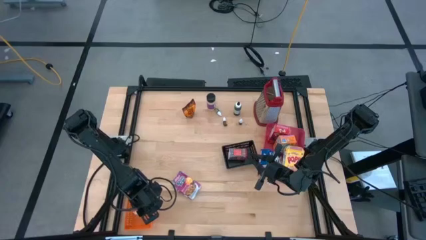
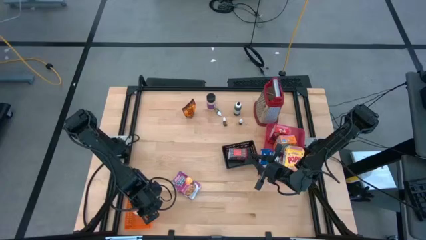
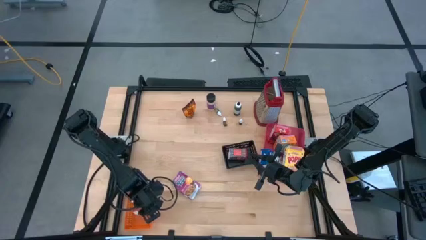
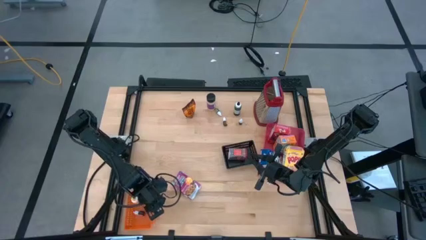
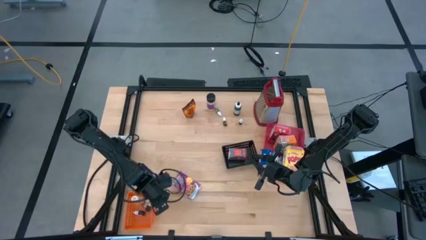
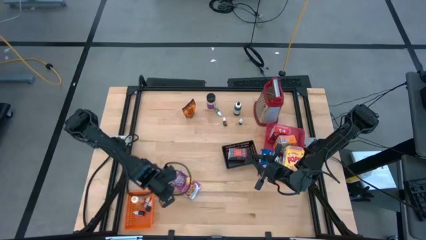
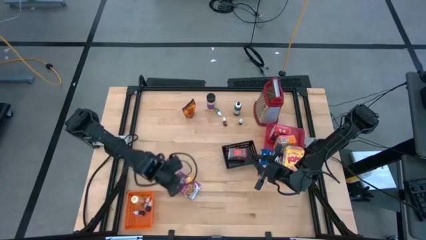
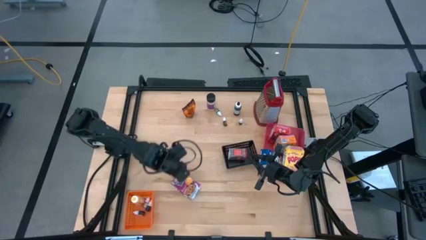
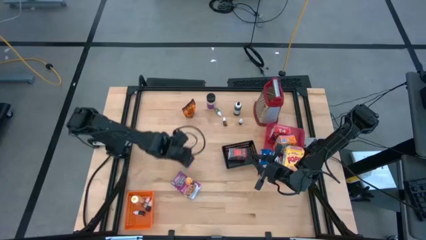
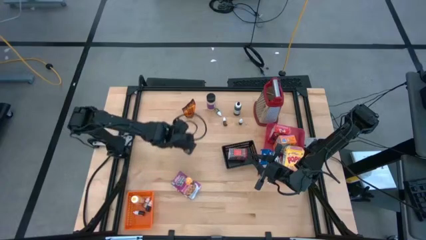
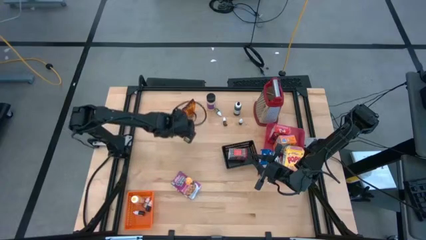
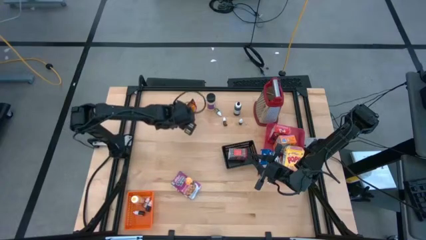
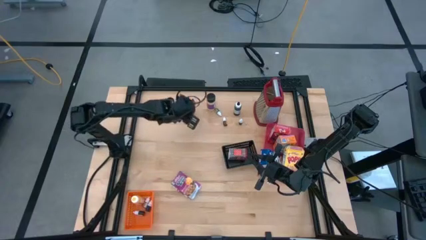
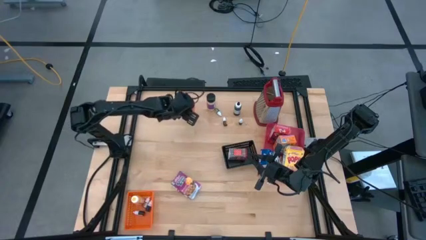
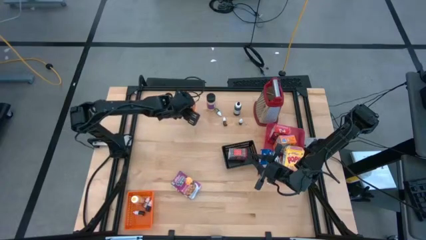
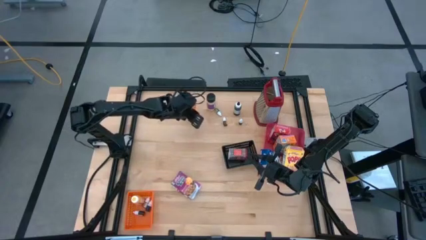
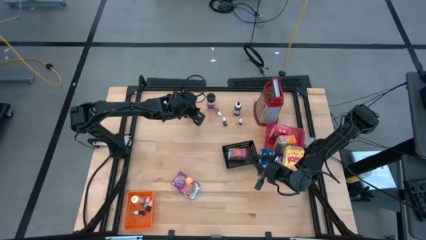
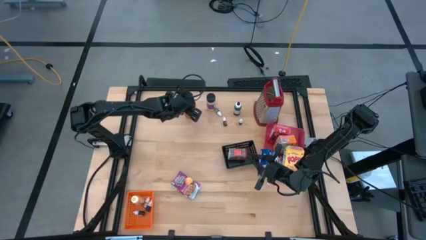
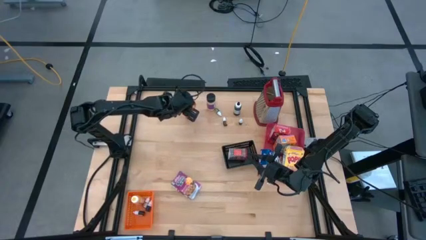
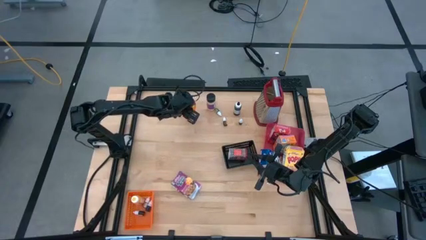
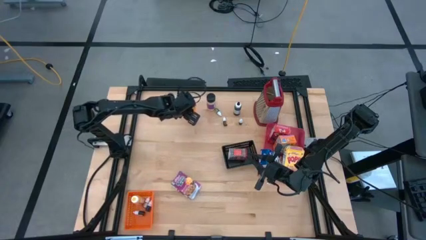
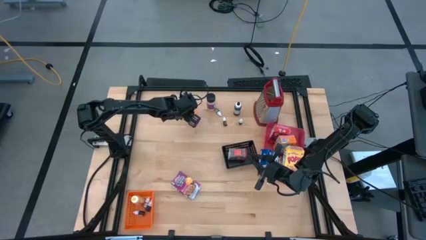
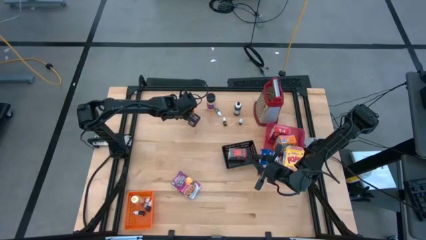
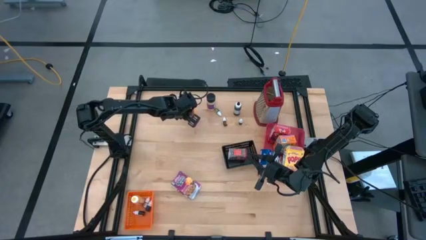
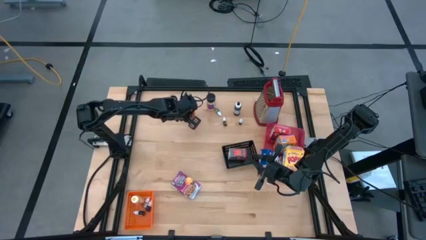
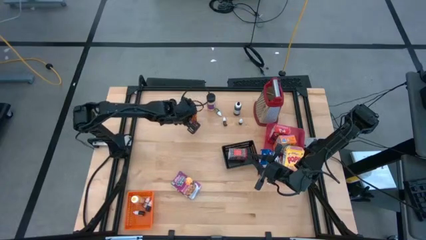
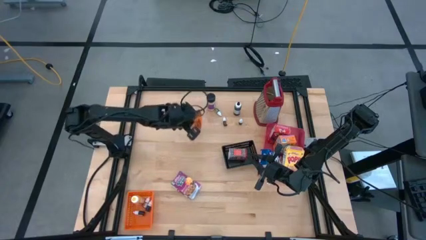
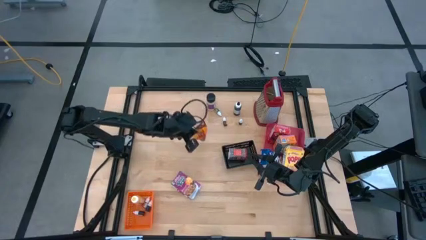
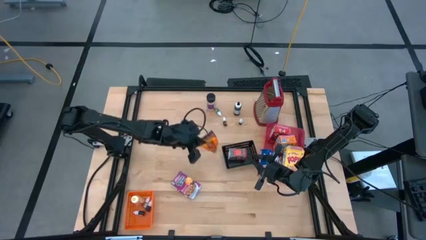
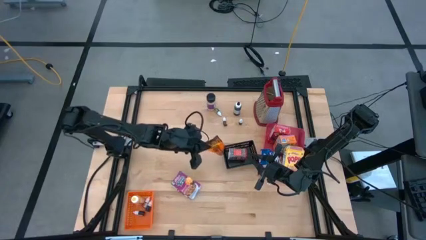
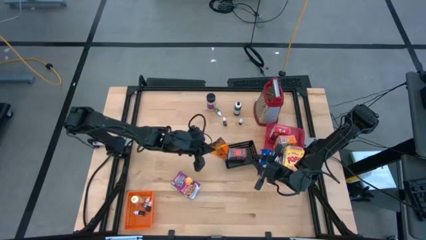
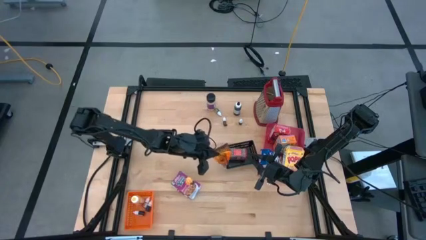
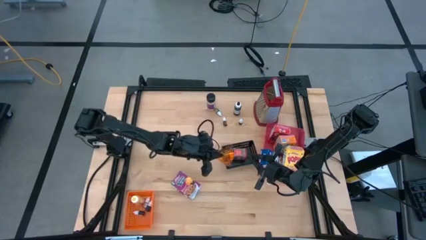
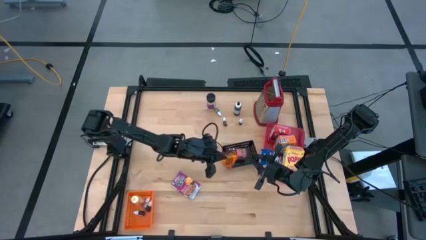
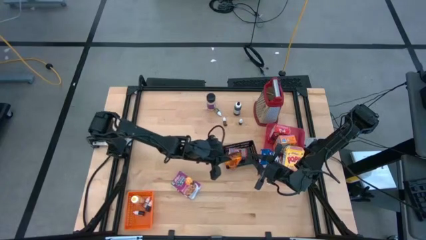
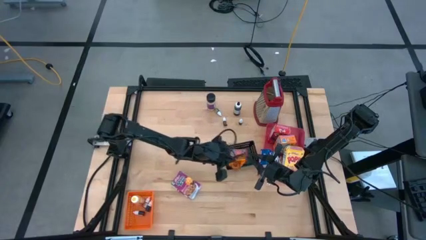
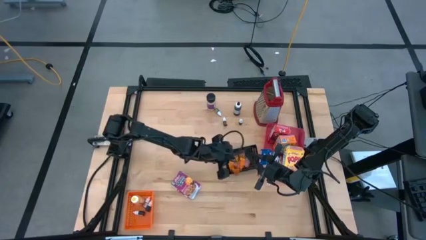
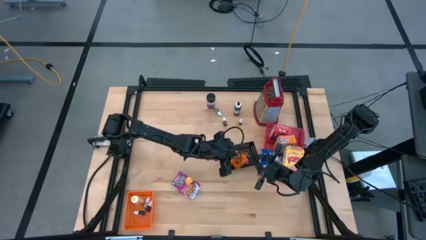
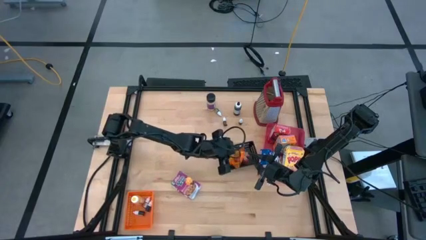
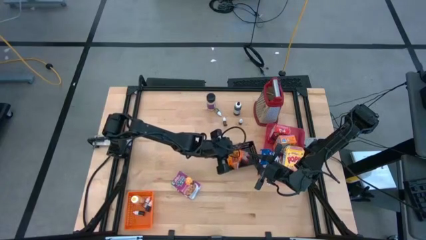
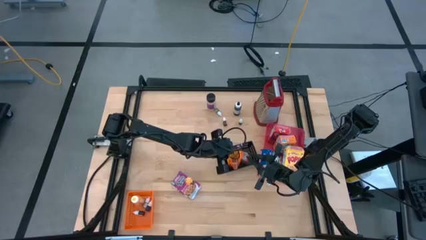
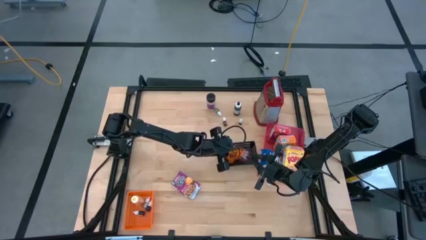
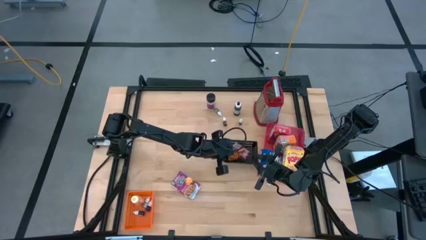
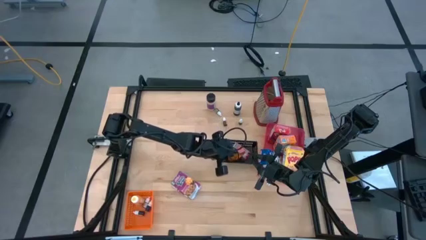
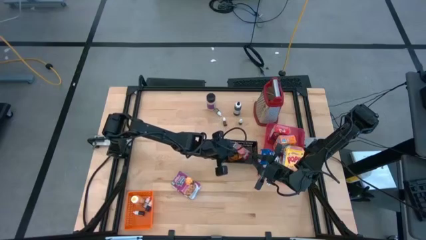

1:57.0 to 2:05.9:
Task: Pick & Place Kitchen Items
Put the orange seasoning pack into the black bin

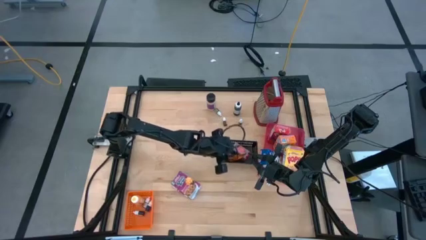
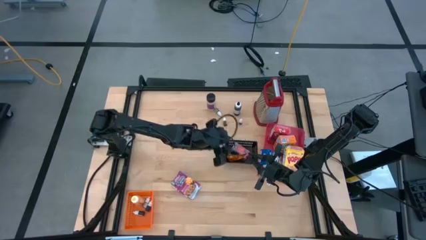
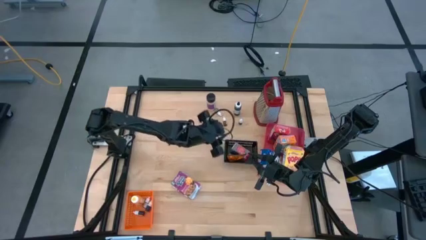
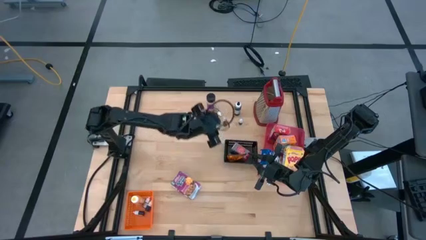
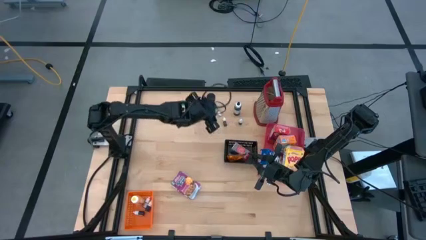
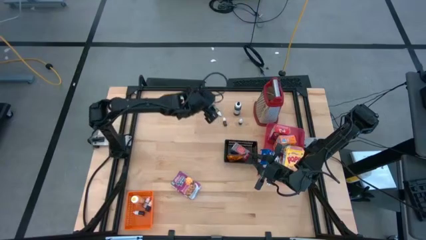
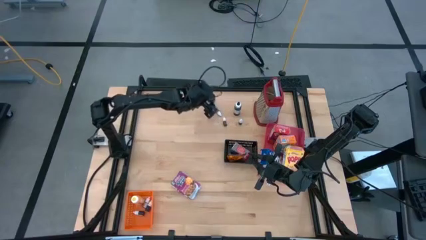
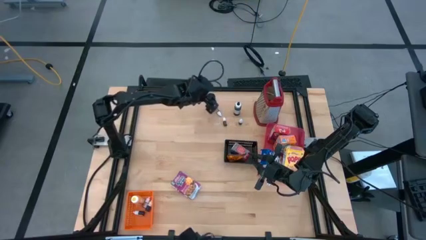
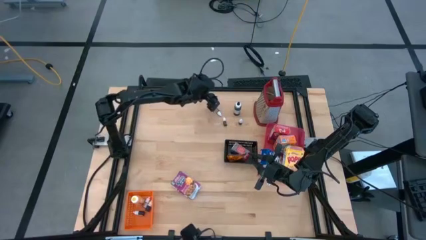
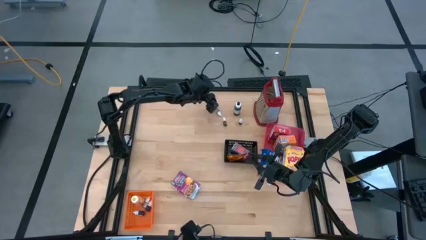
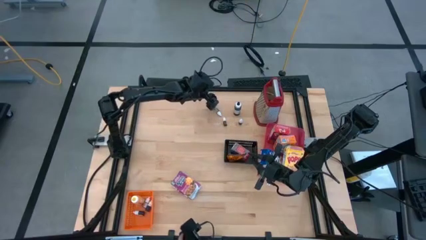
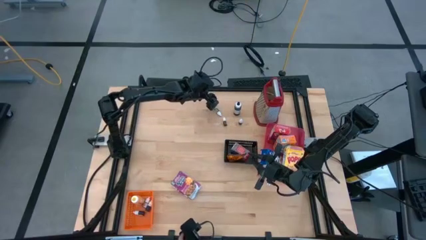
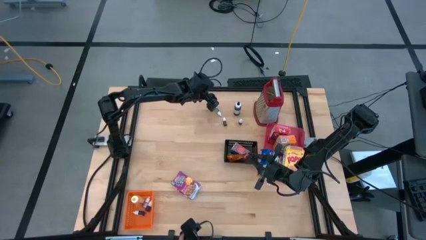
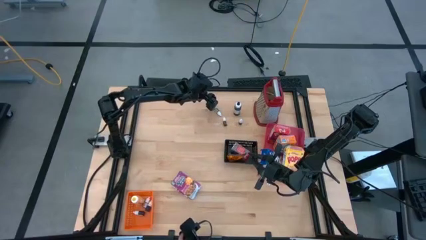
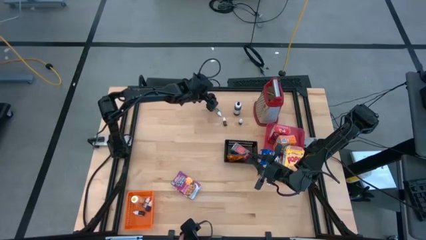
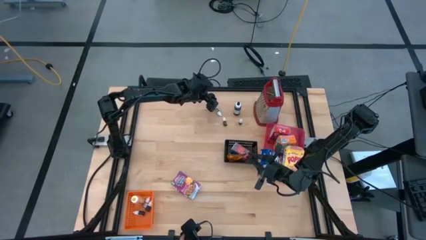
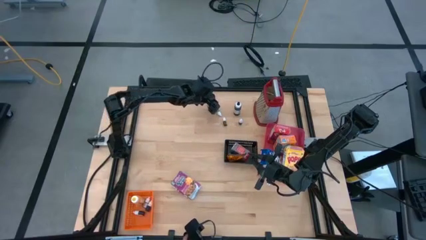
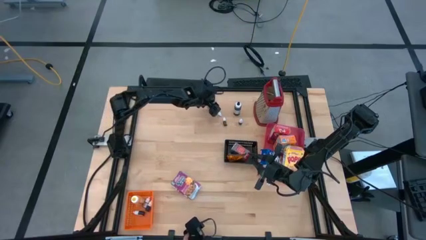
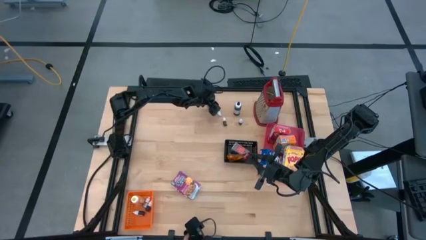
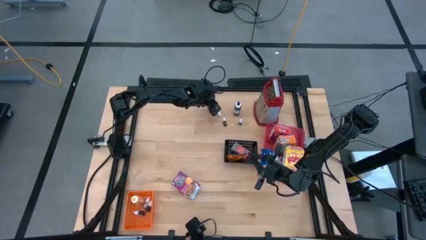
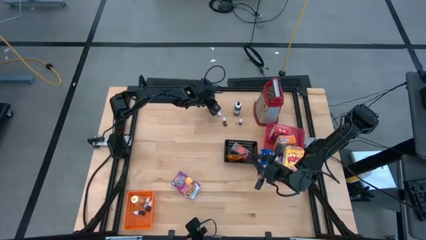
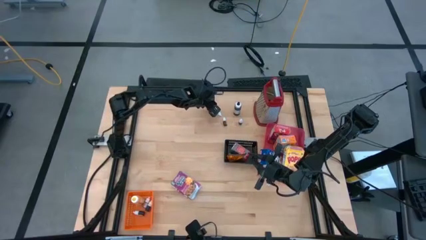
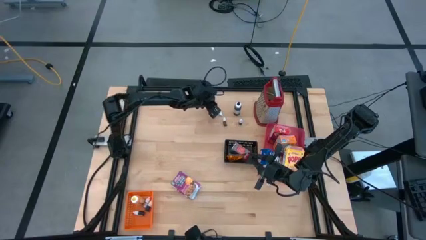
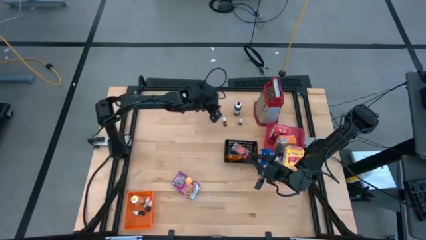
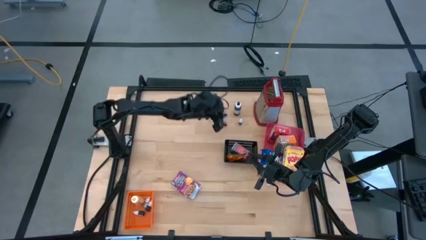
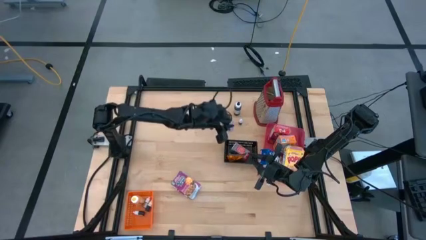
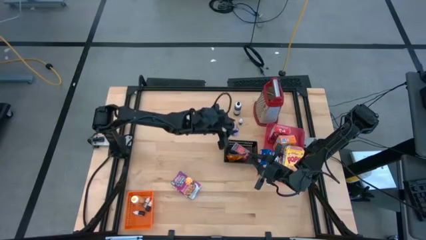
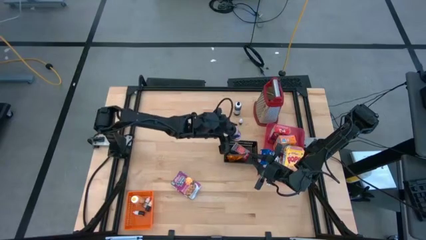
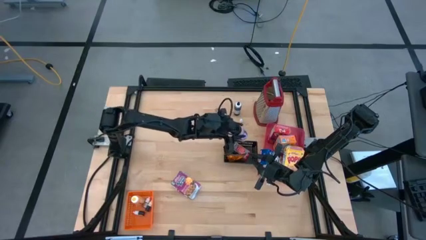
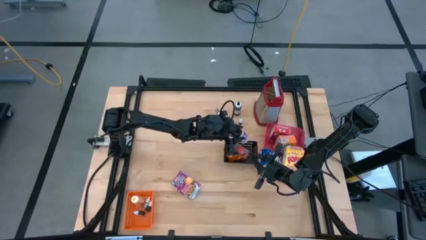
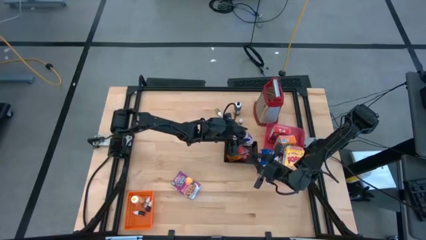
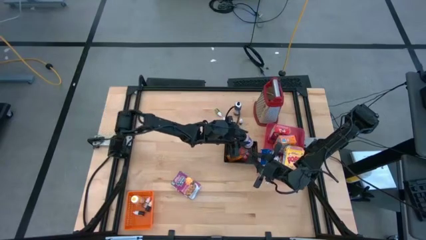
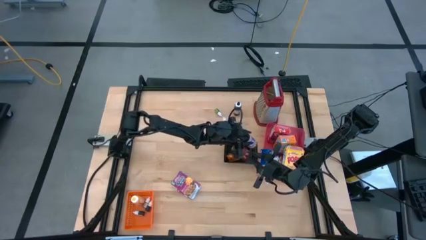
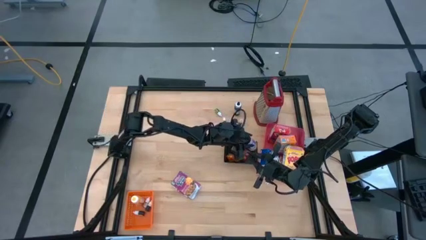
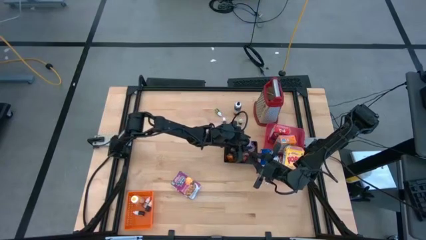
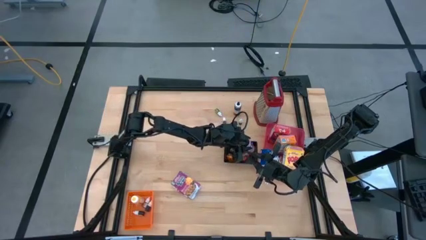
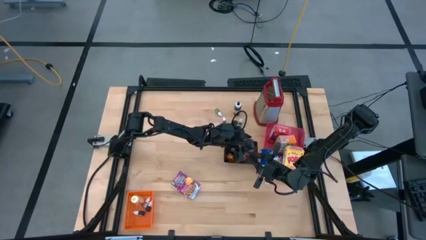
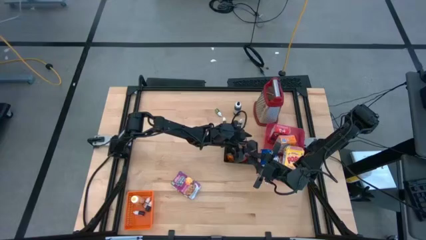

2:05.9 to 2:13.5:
Put the purple seasoning bottle into the black bin
